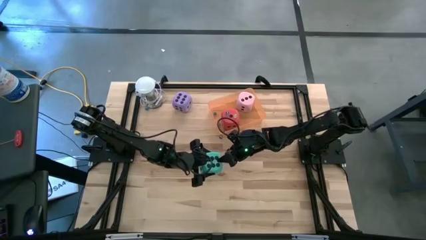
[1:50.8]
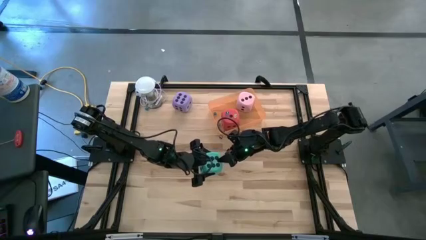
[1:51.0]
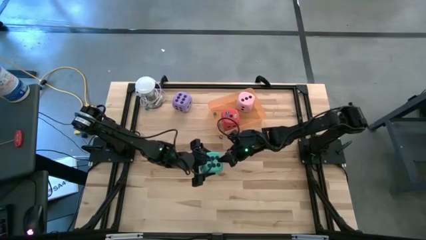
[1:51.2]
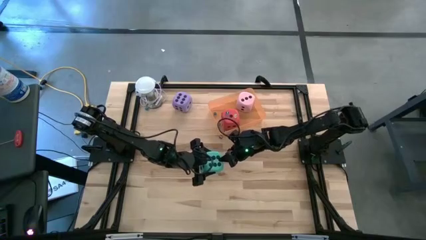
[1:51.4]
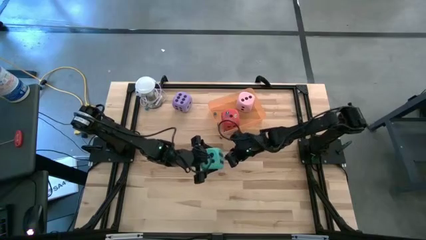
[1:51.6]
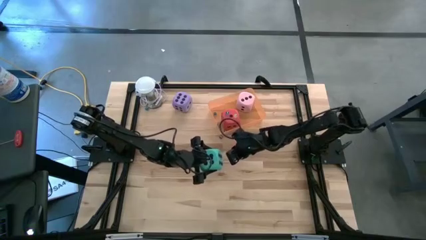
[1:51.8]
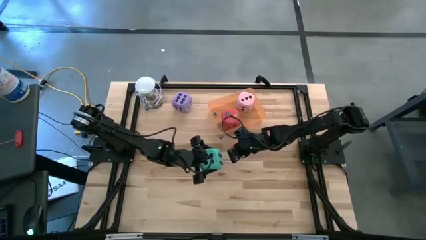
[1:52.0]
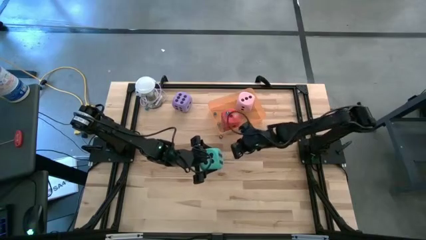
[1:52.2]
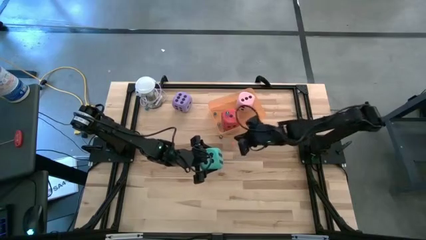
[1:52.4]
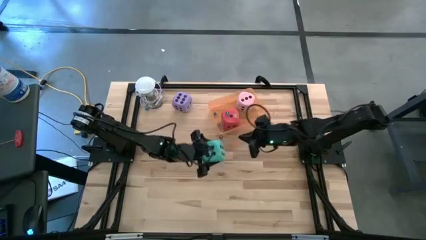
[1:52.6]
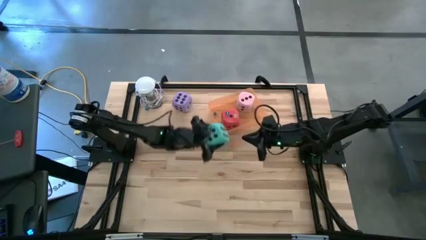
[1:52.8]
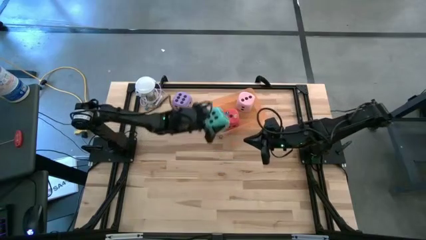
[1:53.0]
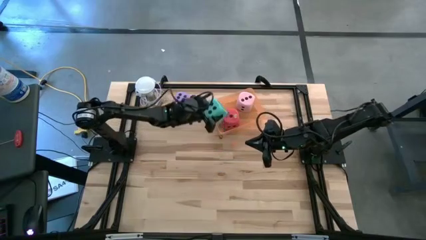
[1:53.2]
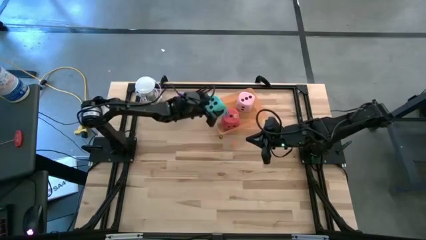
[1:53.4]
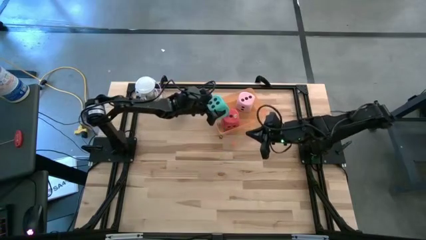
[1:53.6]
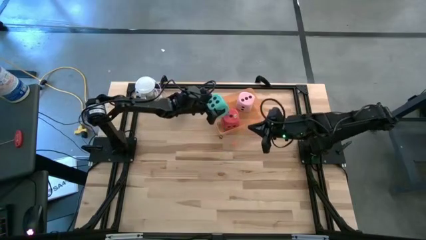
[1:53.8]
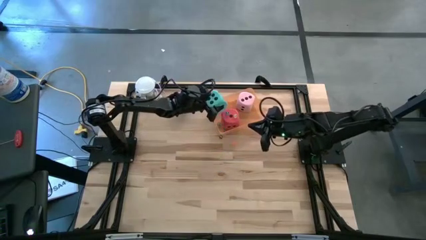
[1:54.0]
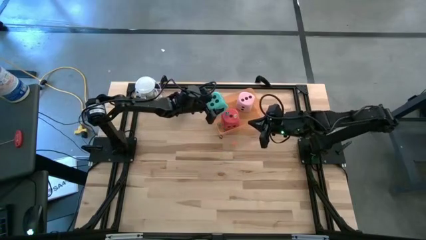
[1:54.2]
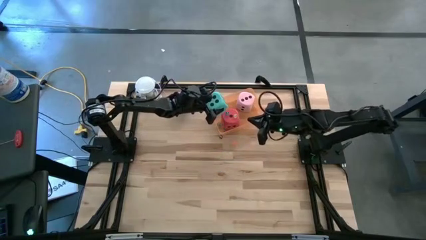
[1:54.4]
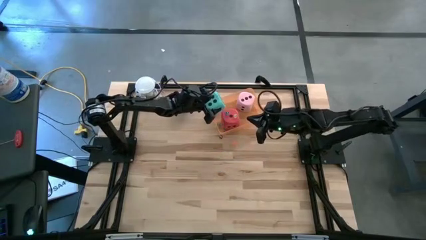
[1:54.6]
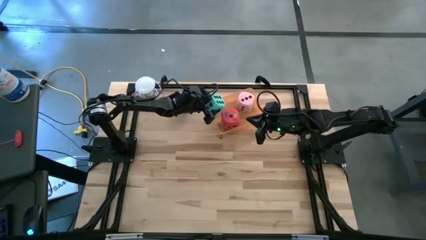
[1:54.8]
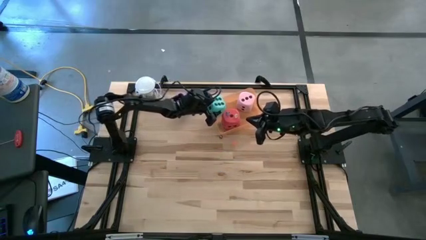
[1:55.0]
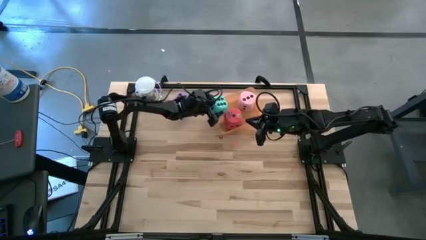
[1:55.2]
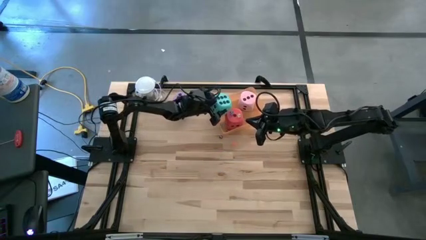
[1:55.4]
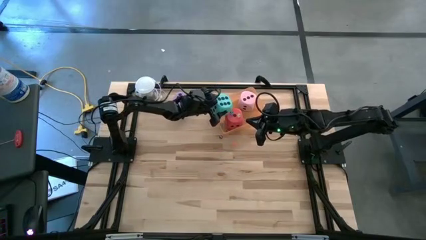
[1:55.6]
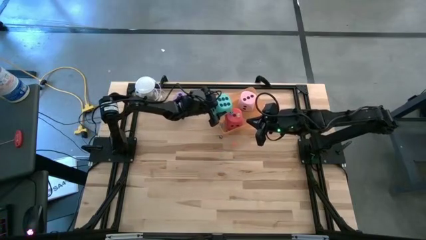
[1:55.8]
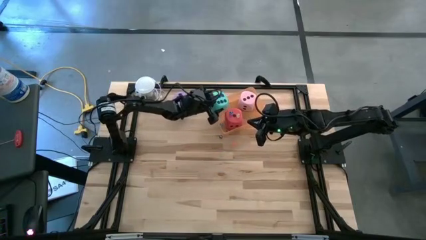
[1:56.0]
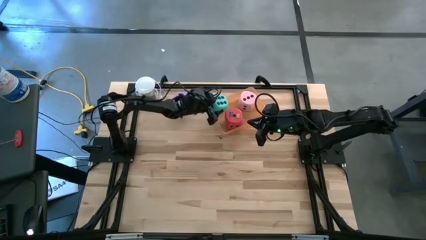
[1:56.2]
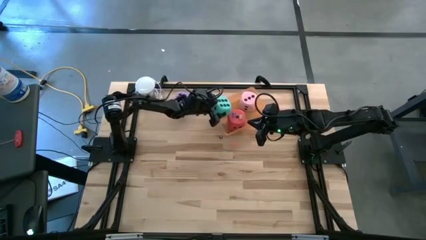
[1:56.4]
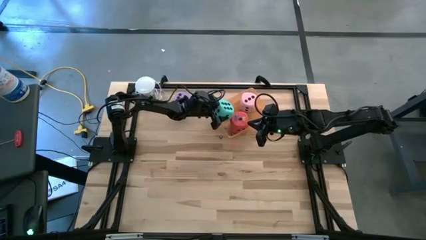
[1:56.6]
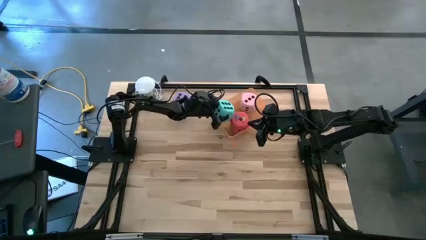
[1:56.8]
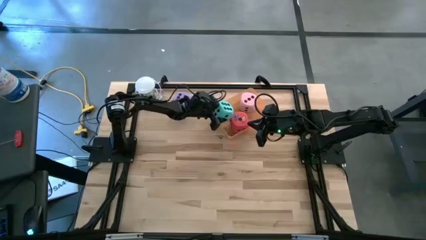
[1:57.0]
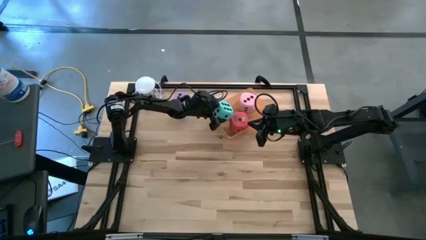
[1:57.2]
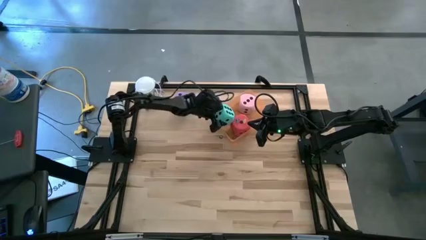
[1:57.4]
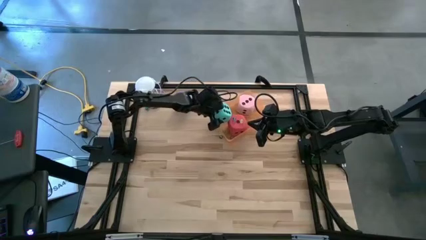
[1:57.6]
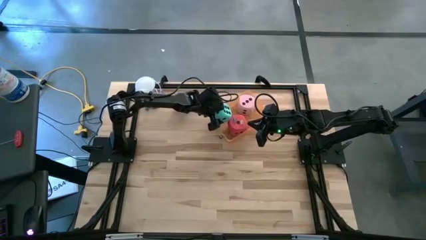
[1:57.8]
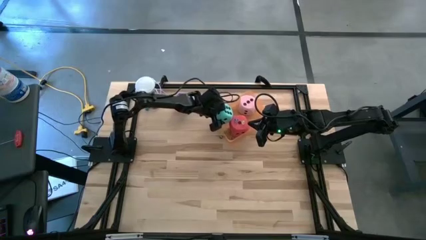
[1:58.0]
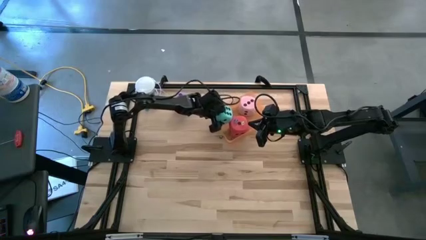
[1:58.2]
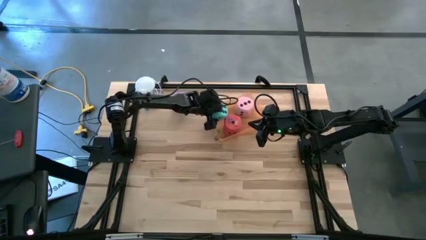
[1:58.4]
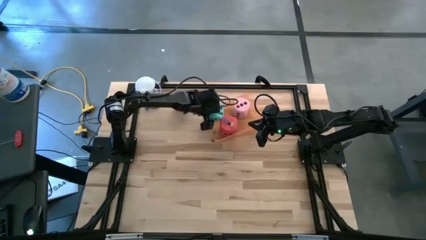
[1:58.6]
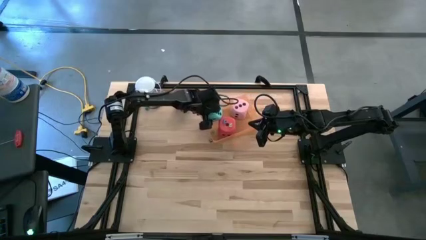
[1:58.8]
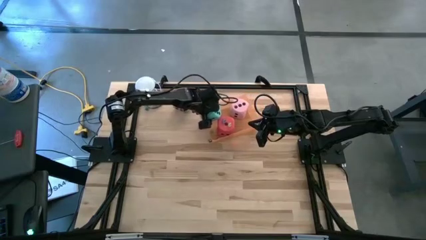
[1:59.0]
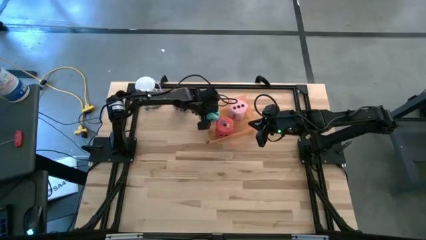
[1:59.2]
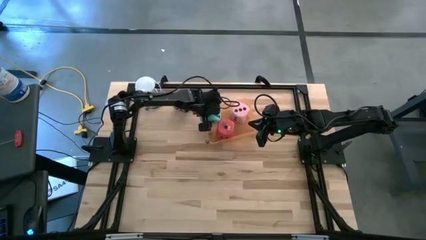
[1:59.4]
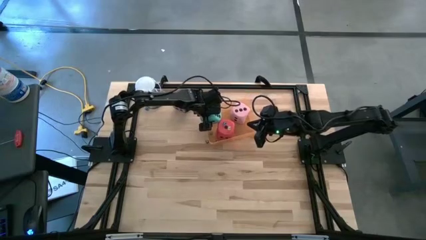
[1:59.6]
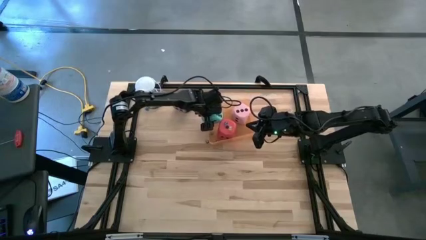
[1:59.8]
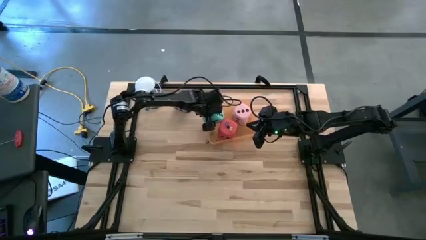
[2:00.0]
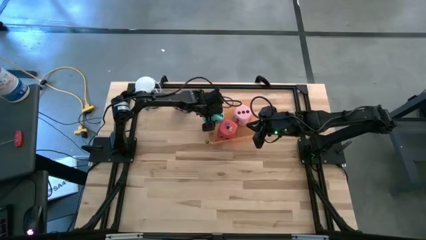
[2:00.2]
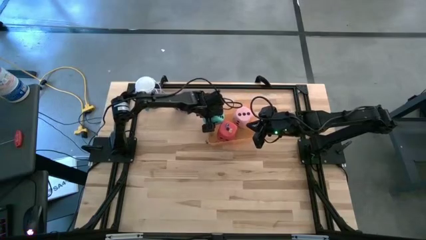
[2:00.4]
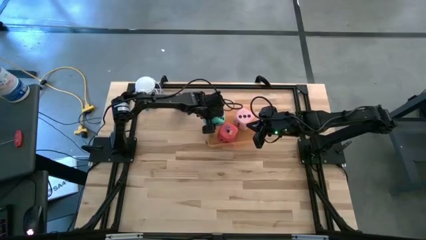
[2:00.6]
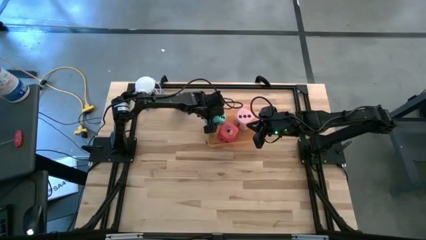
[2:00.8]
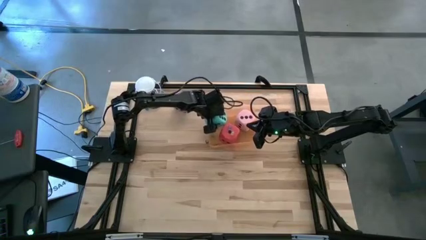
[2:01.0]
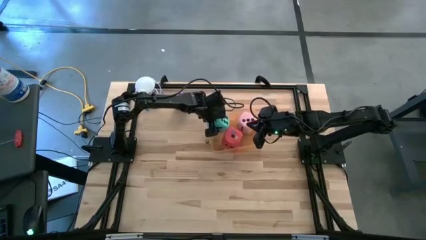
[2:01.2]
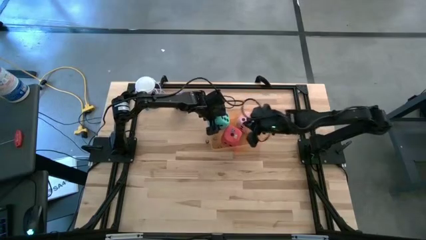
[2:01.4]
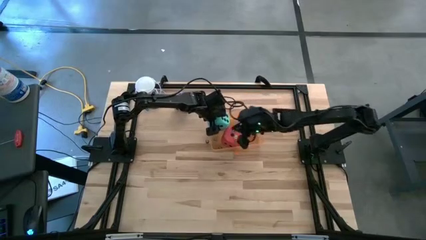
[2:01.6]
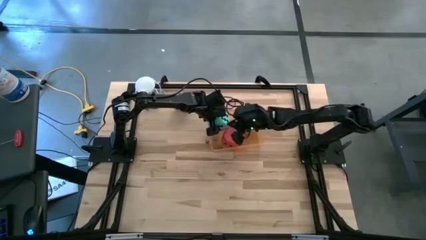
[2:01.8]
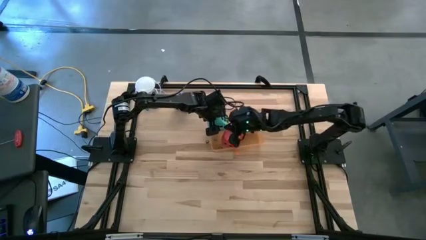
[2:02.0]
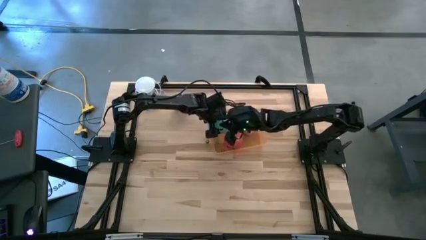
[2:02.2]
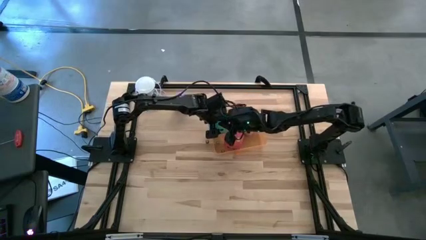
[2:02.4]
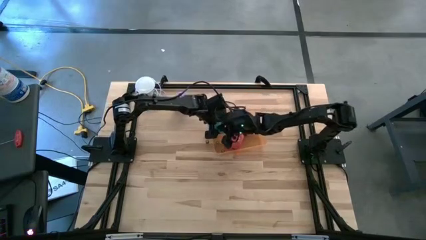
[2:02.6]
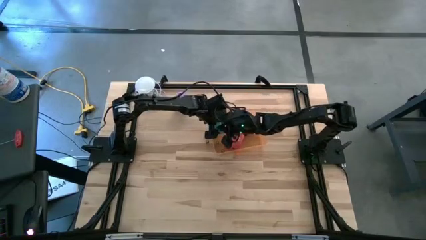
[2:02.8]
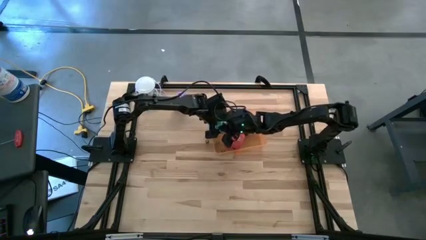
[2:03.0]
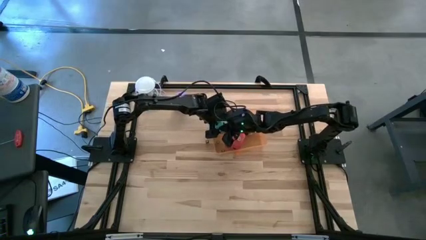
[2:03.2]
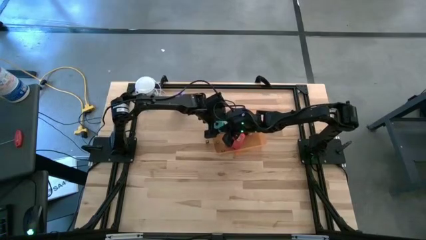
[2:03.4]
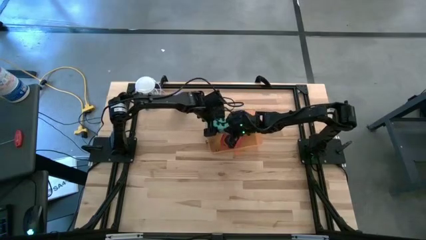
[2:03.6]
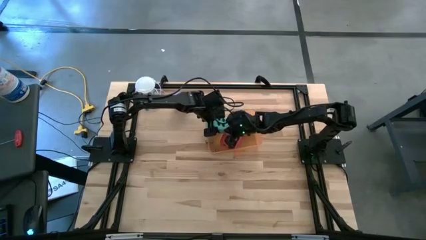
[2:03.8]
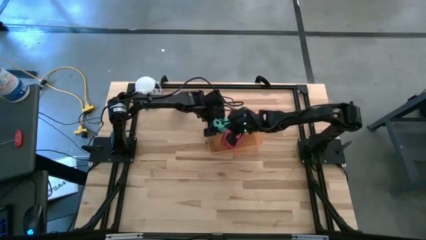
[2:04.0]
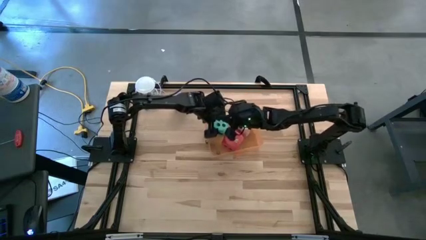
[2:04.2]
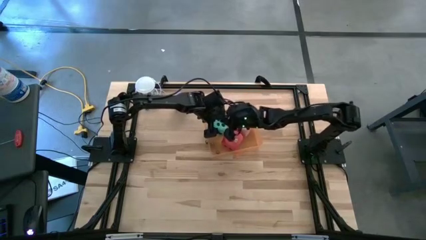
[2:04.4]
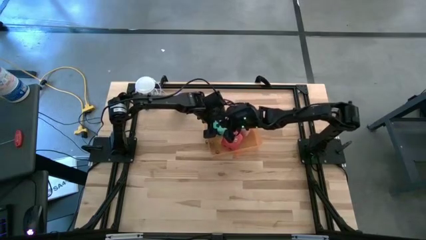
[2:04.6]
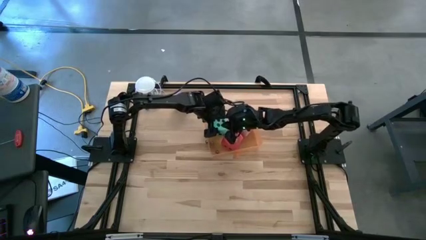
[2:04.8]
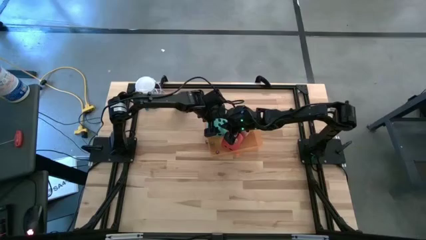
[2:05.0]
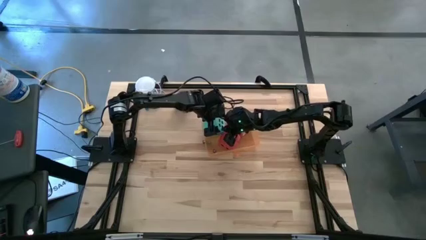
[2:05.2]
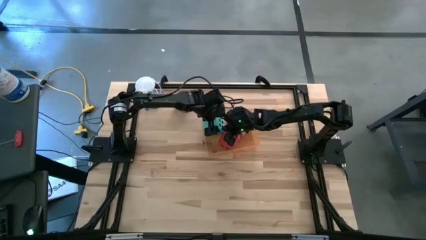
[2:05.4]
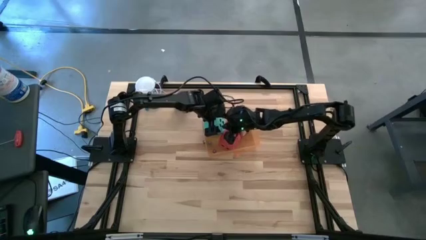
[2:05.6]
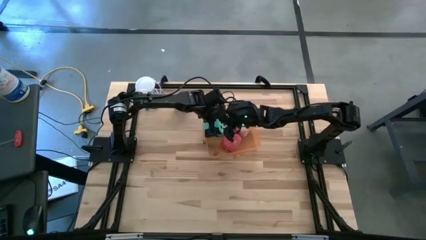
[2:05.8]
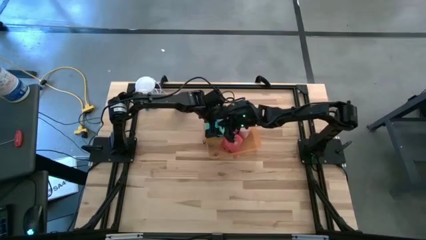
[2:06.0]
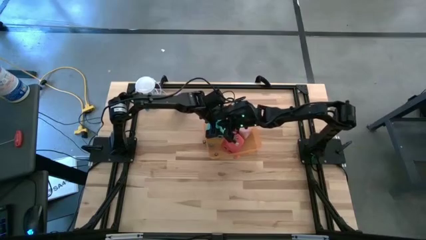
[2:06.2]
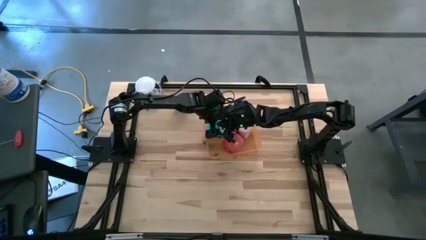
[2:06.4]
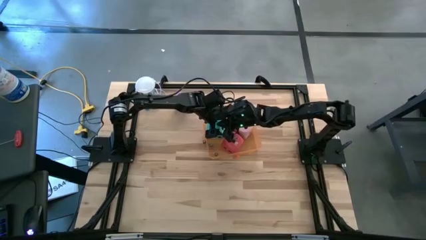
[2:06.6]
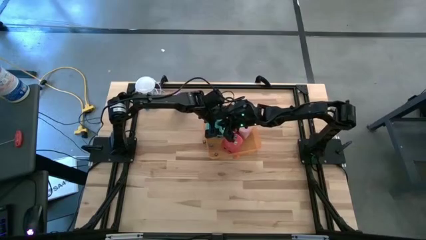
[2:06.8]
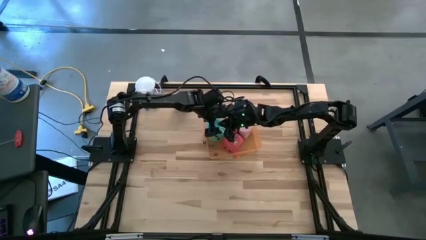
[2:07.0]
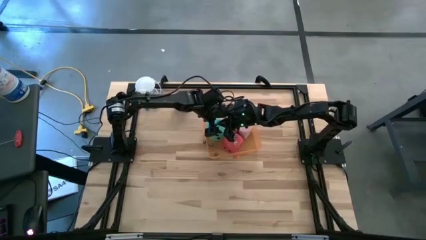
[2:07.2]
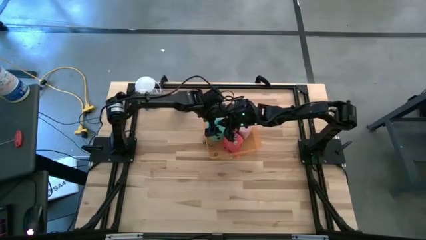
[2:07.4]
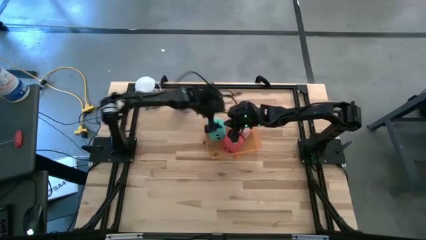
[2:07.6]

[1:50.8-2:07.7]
Task: Pick & Place Dice
Put the large light blue dice into the orange bin
